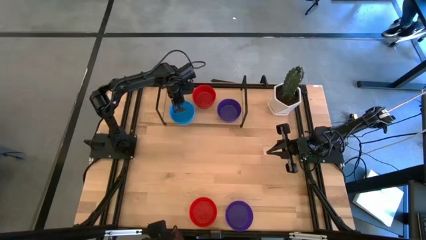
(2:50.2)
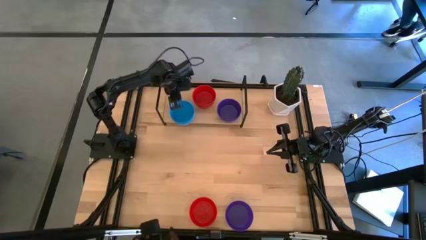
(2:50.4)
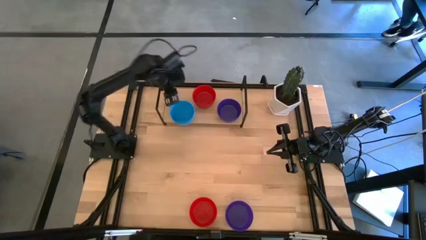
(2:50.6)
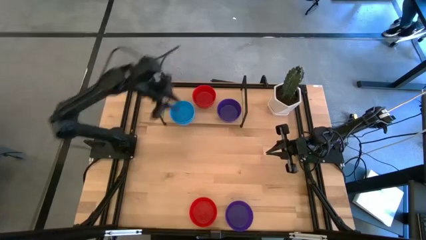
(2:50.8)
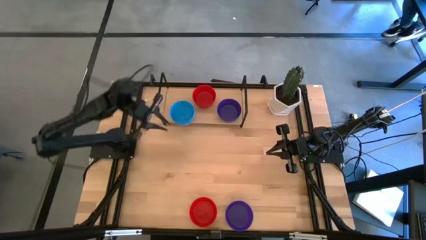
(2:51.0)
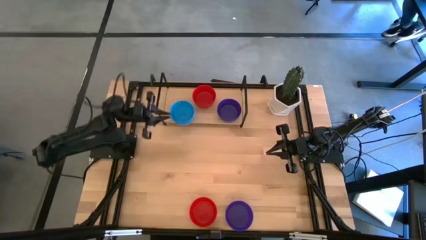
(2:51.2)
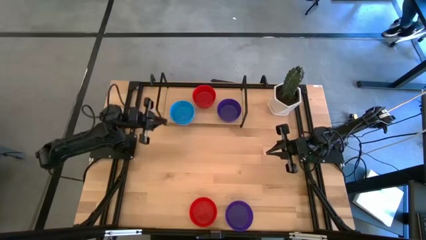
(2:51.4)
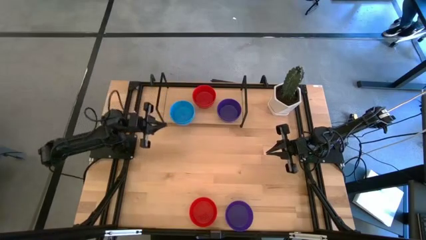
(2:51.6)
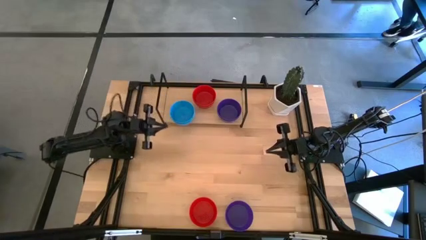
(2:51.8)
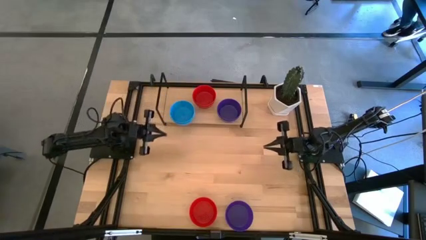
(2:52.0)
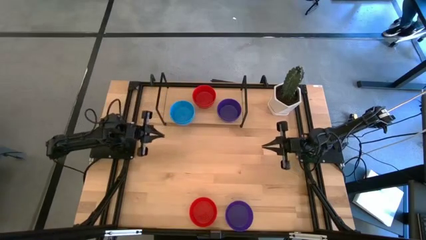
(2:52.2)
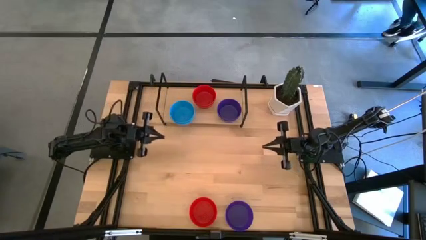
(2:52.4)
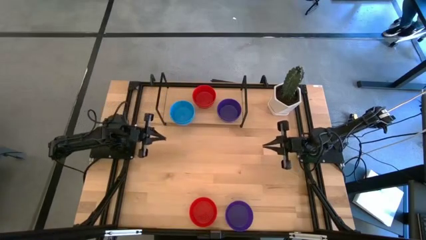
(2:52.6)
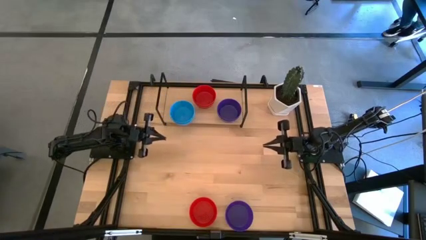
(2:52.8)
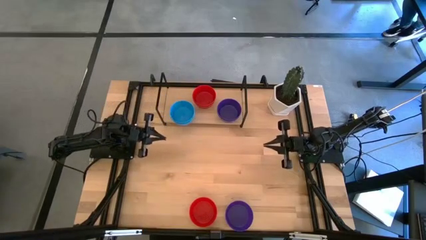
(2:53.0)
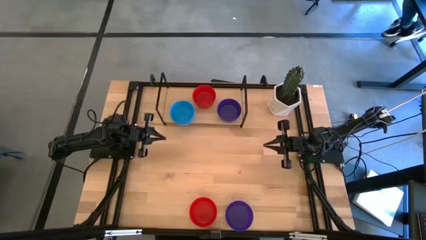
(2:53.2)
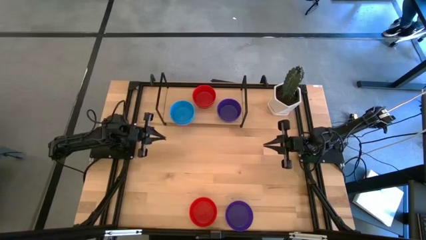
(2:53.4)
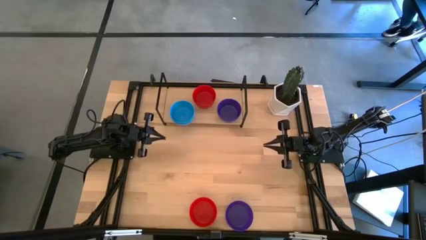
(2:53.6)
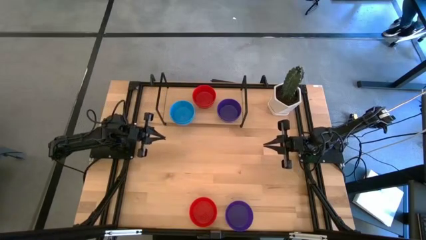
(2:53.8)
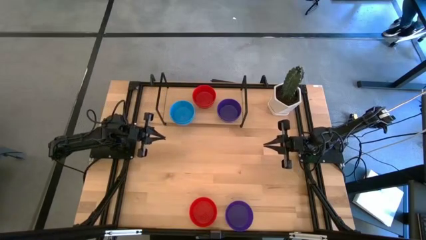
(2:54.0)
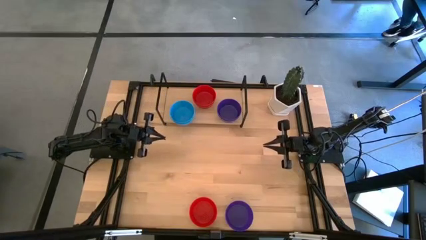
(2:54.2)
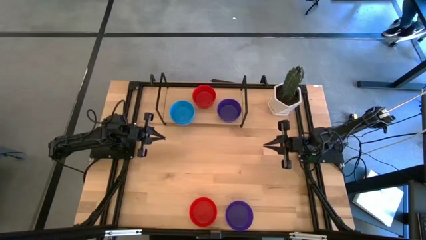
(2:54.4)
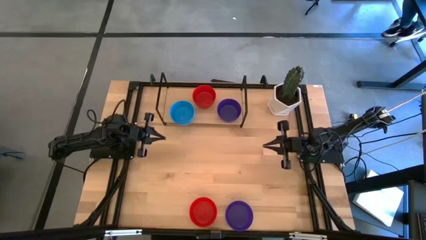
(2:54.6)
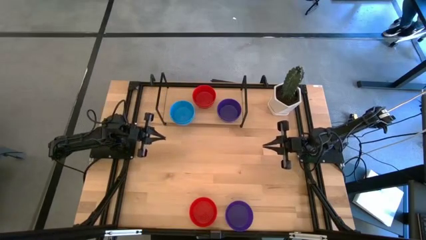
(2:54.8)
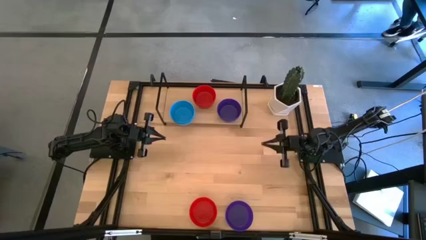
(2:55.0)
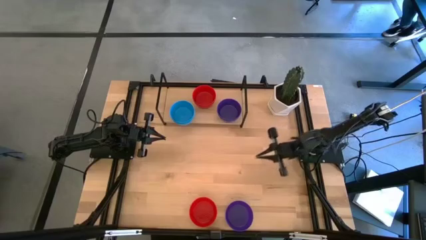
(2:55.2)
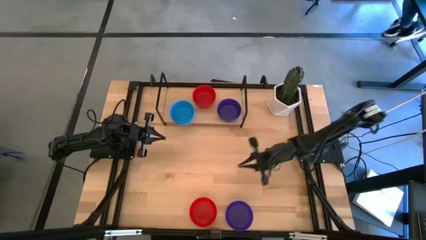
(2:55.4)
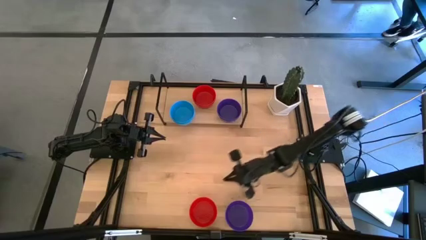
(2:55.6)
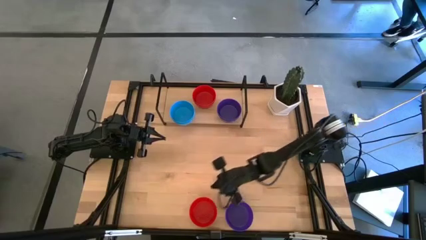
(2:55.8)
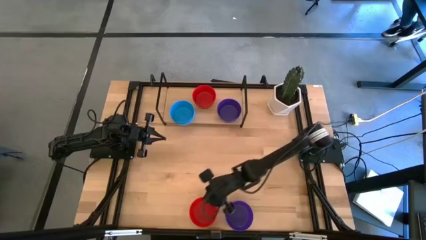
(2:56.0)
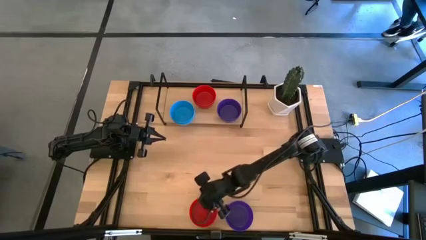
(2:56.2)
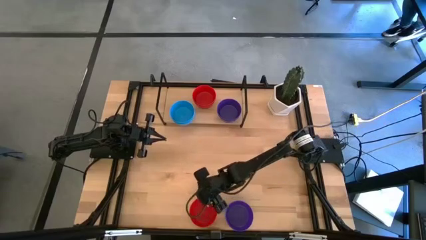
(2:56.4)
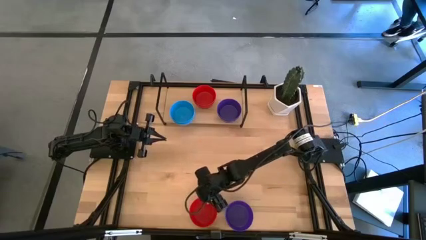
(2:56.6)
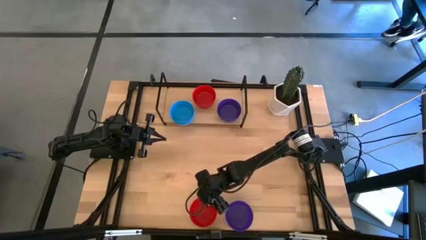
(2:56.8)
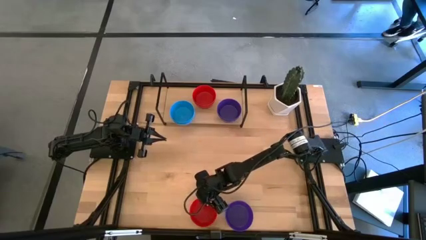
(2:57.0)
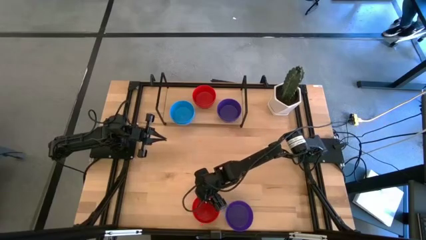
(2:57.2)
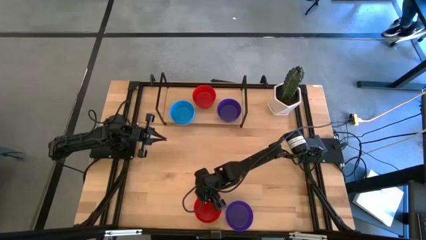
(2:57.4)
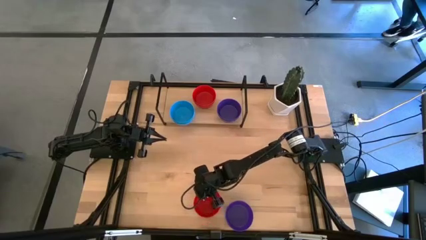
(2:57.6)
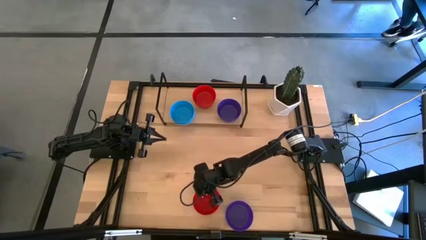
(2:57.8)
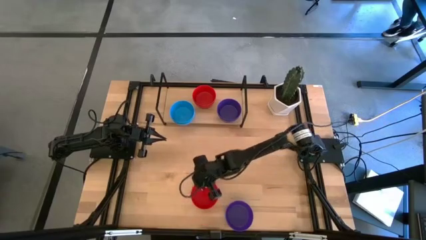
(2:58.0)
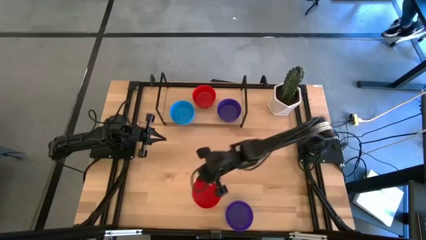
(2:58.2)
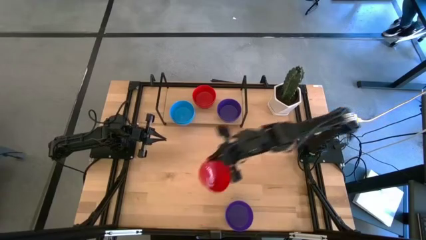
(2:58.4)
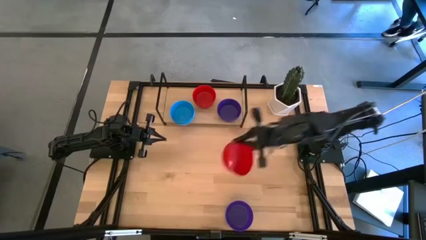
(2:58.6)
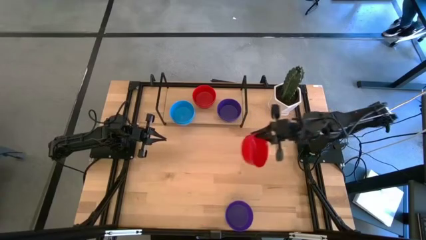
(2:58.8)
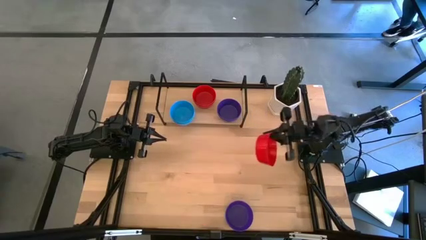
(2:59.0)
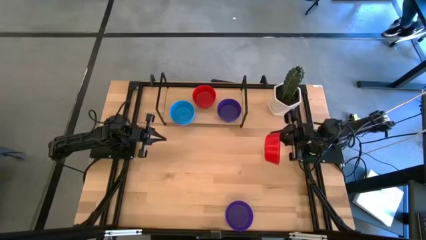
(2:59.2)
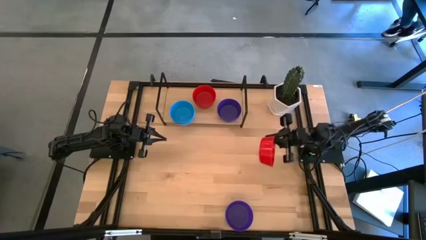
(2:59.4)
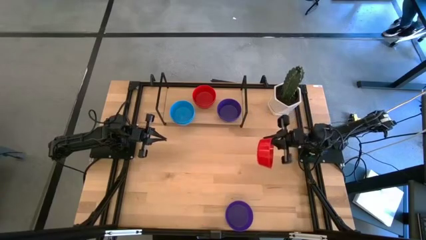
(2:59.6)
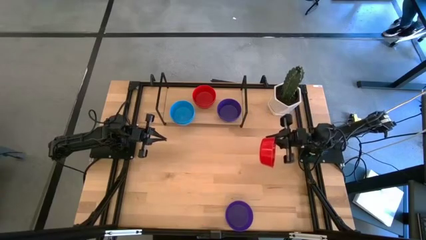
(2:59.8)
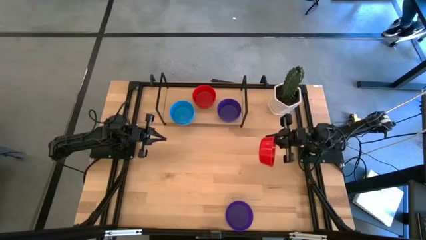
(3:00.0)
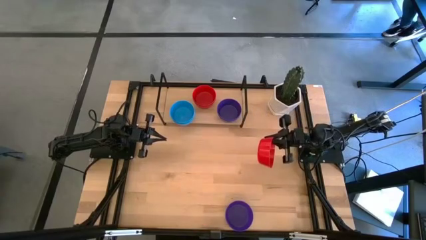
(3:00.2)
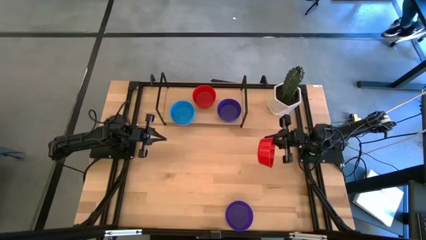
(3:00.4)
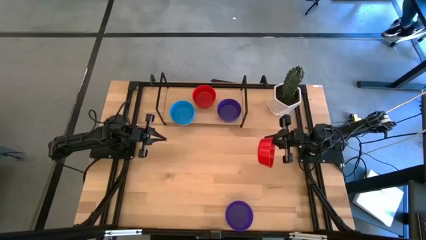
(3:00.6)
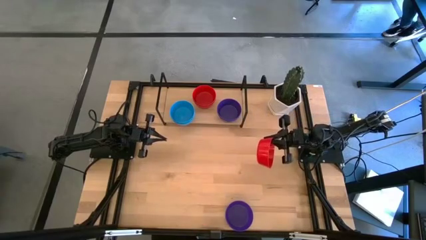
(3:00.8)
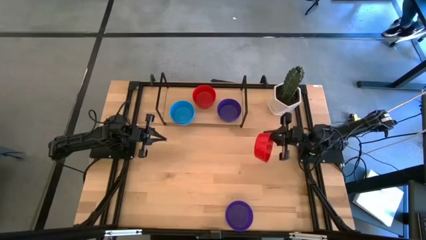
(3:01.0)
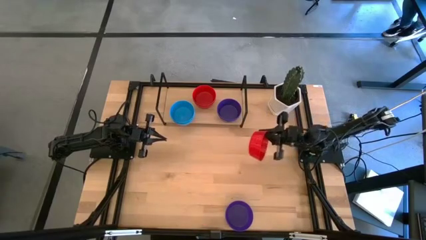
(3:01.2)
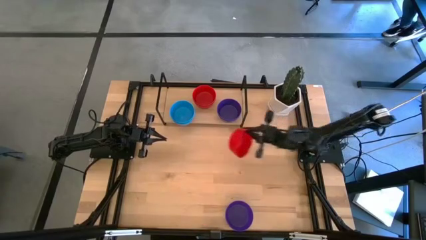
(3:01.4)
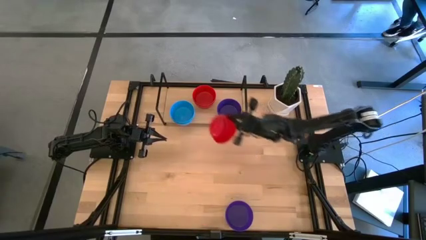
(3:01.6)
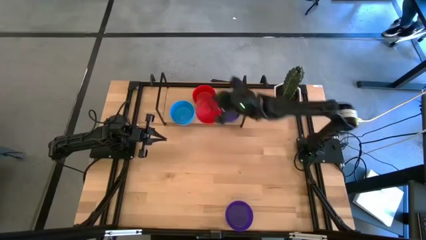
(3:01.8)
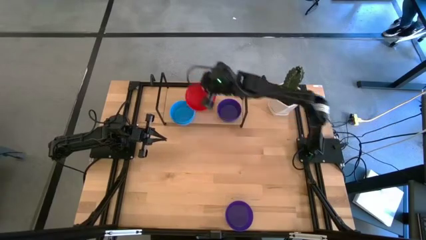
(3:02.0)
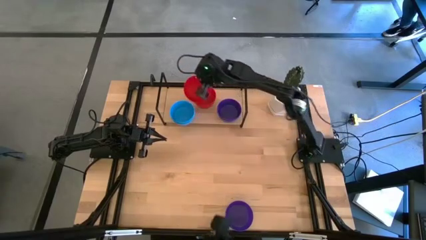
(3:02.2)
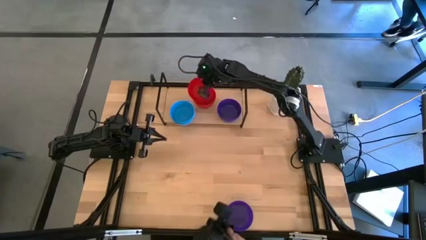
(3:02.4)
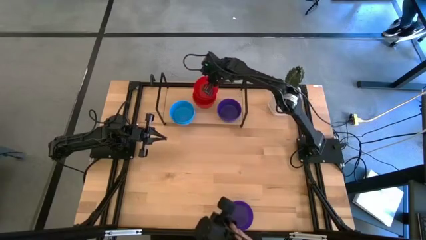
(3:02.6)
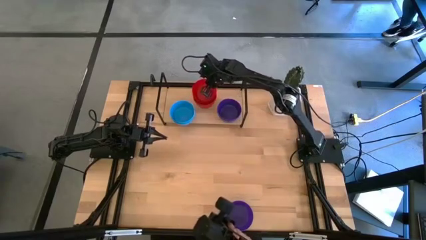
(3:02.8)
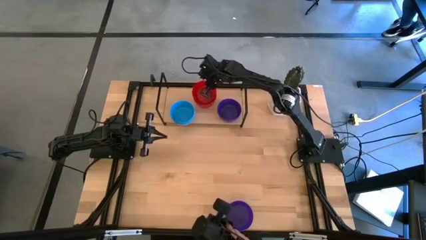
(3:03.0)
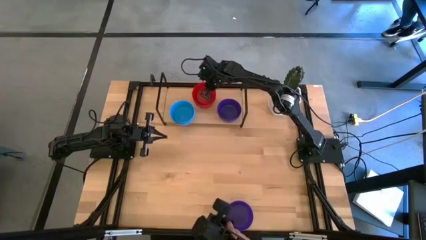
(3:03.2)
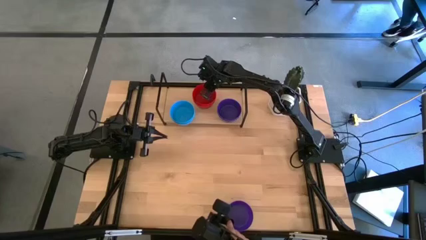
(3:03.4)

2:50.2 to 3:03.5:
Task: Pick & Place Mini bowls
Stack the red bowl on top of the red bowl on the shelf

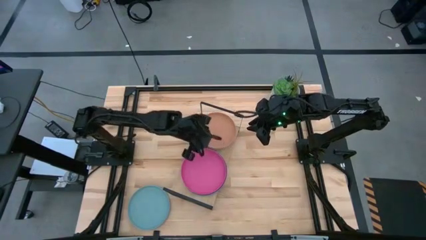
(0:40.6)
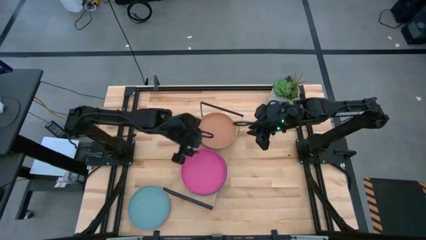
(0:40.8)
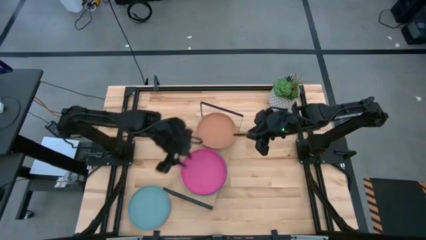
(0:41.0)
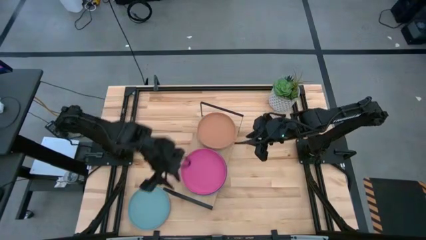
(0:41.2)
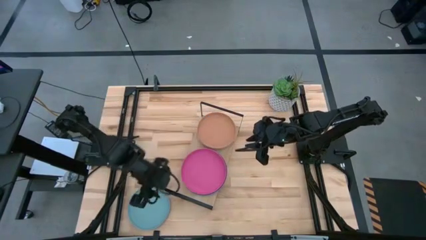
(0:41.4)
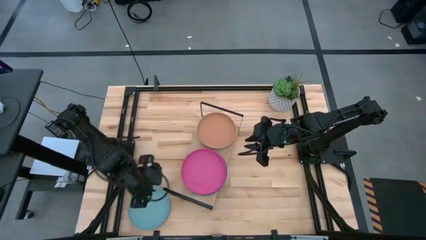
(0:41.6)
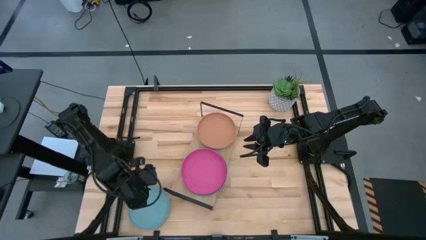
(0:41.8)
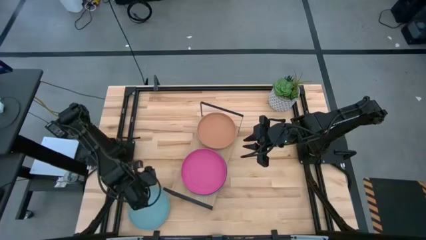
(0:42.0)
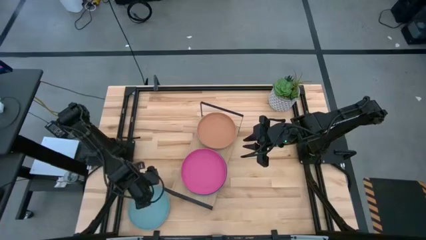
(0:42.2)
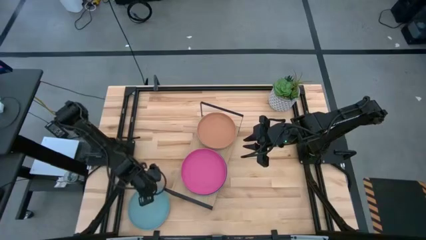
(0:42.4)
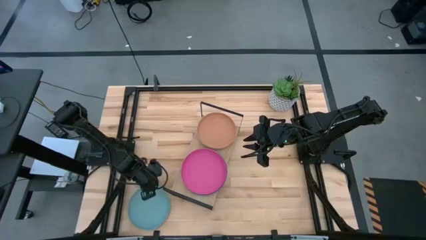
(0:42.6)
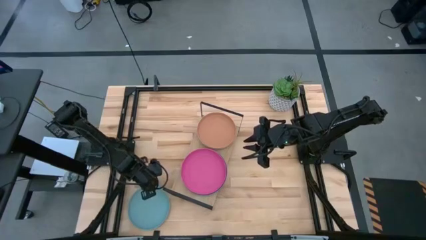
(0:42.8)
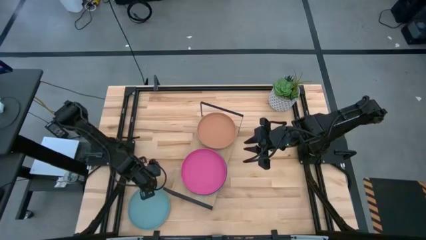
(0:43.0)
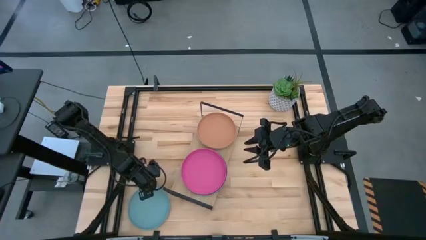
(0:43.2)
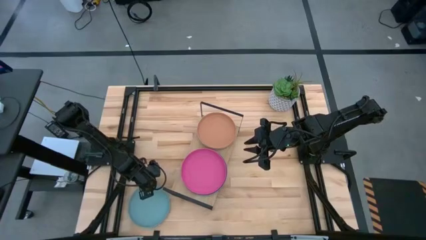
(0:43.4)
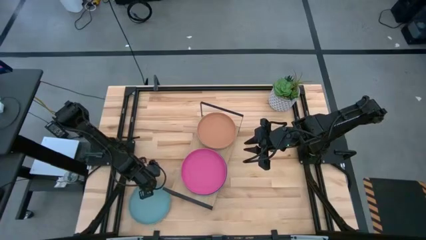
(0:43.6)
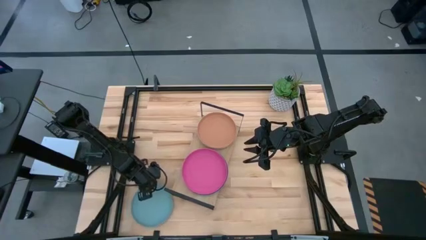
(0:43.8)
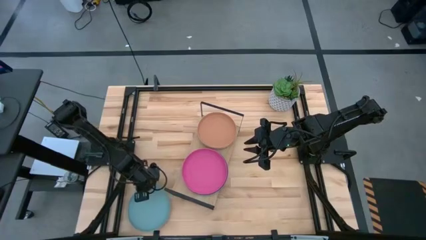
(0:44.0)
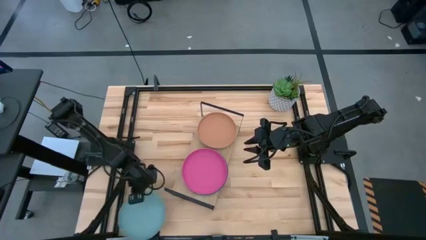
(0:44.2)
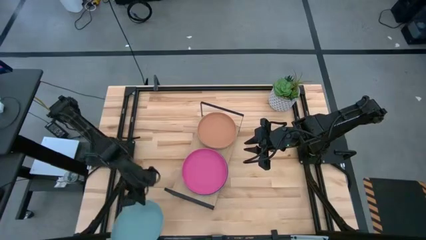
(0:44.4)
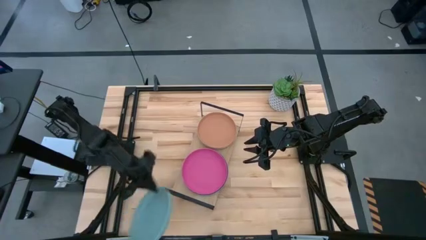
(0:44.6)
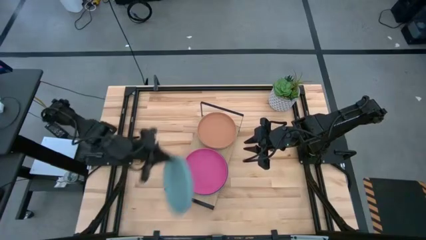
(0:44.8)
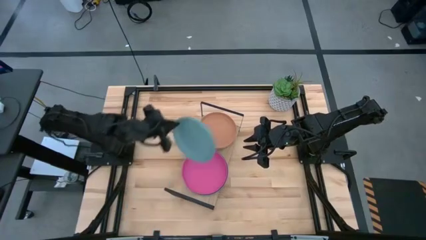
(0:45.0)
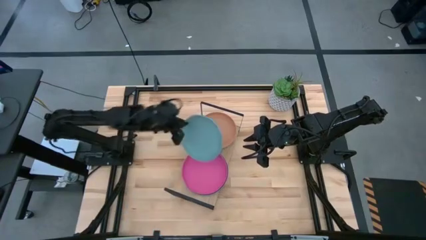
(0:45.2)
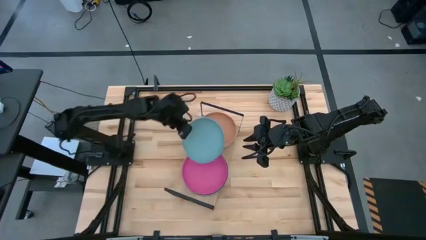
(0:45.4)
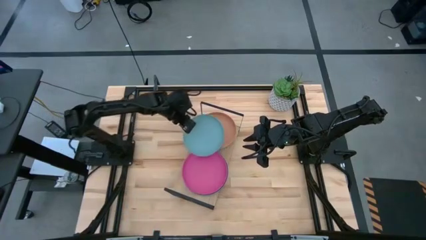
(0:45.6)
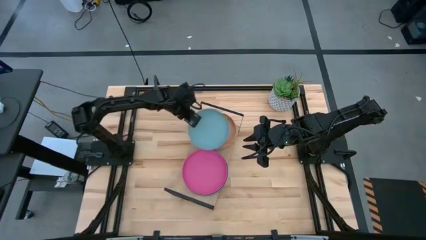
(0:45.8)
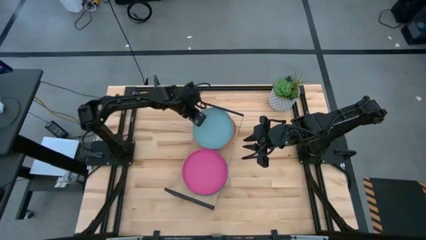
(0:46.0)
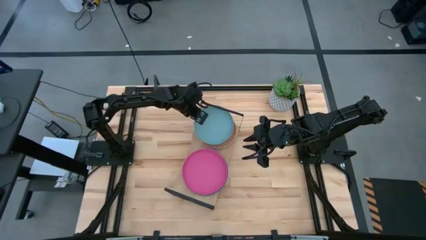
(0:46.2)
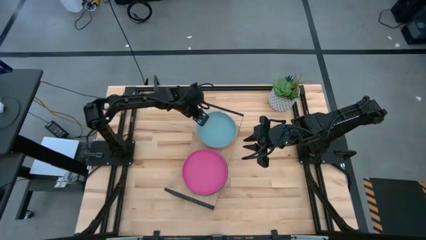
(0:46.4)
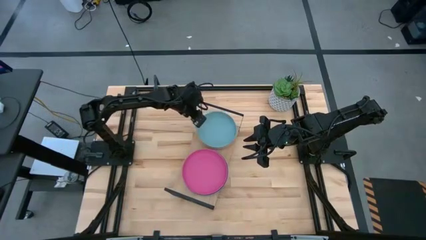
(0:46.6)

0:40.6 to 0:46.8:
Task: Place and stack plates onto a shelf
Stack the light blue plate on top of the brown plate on the shelf
